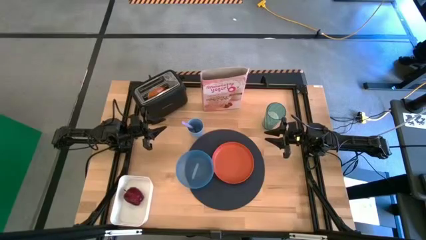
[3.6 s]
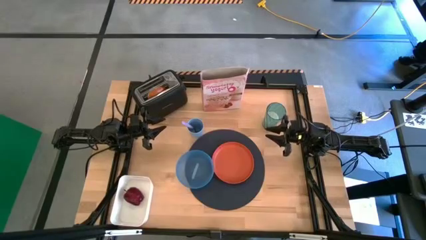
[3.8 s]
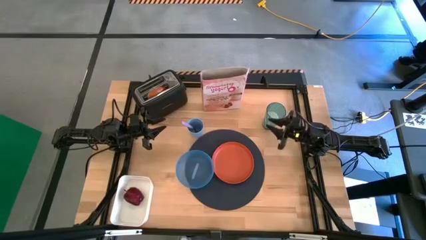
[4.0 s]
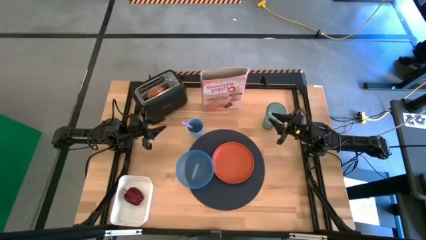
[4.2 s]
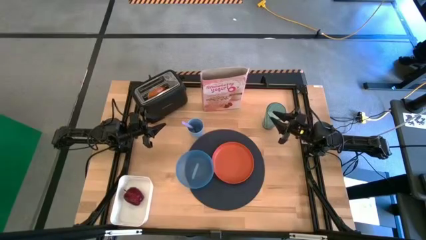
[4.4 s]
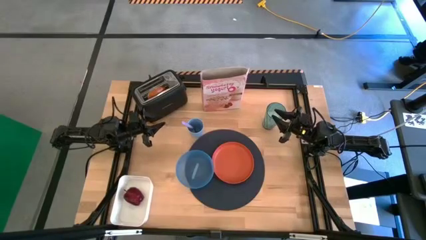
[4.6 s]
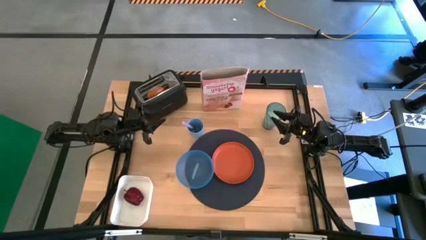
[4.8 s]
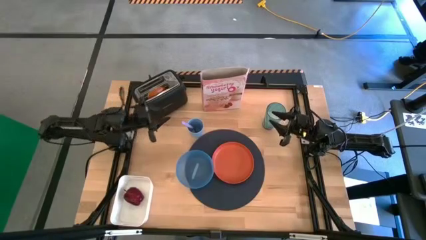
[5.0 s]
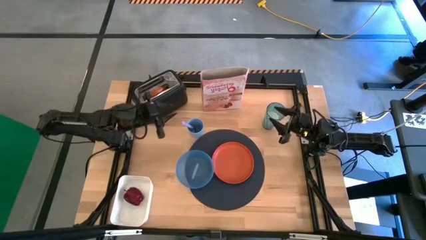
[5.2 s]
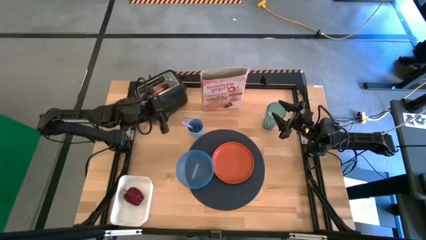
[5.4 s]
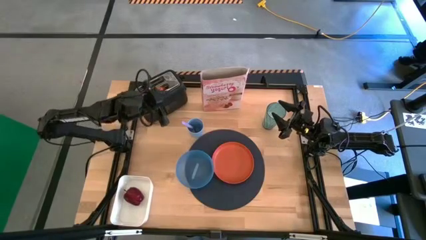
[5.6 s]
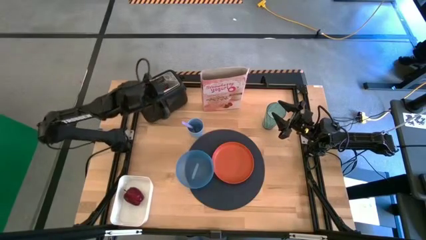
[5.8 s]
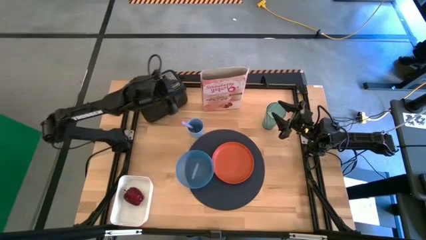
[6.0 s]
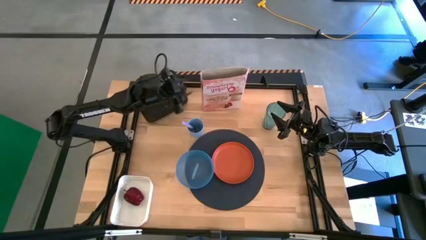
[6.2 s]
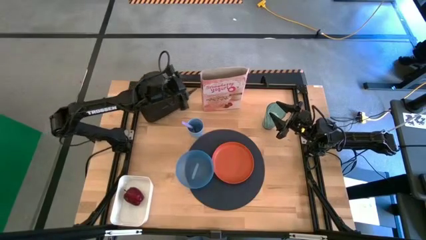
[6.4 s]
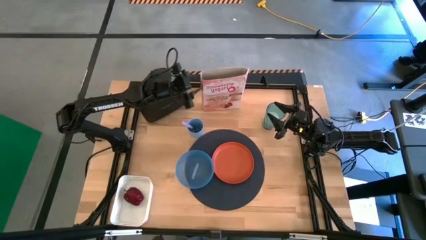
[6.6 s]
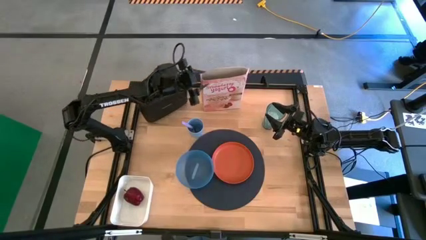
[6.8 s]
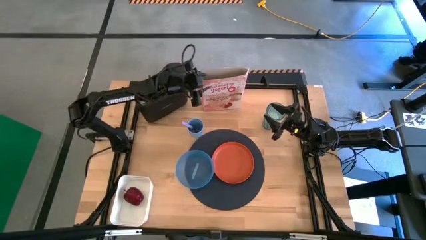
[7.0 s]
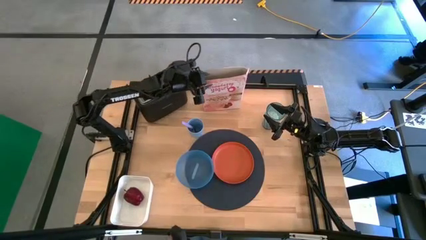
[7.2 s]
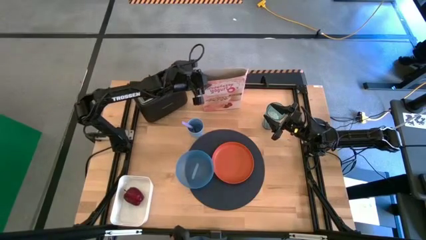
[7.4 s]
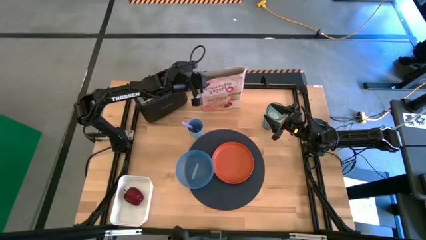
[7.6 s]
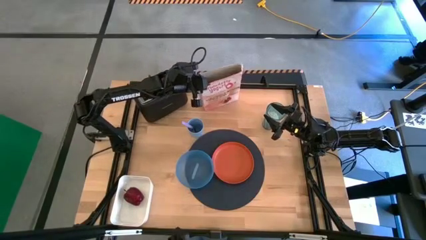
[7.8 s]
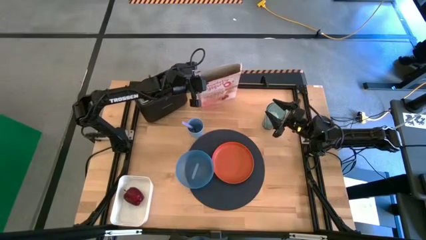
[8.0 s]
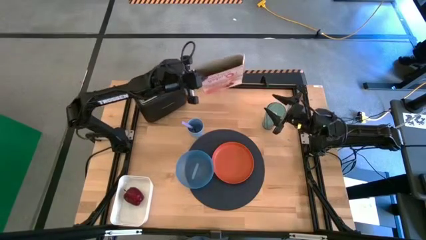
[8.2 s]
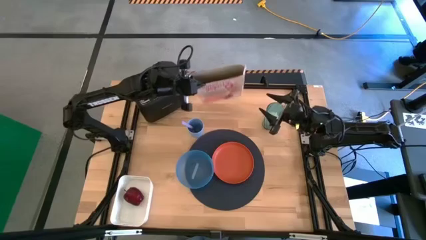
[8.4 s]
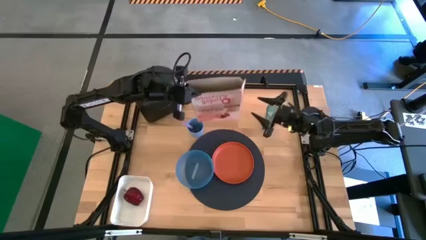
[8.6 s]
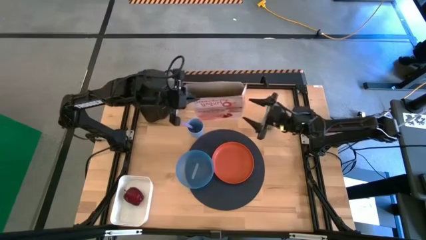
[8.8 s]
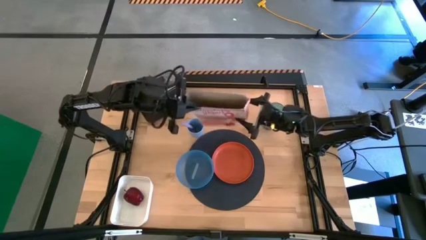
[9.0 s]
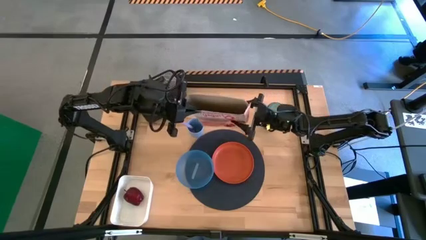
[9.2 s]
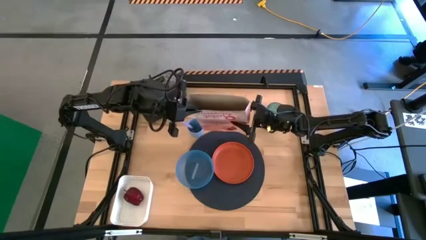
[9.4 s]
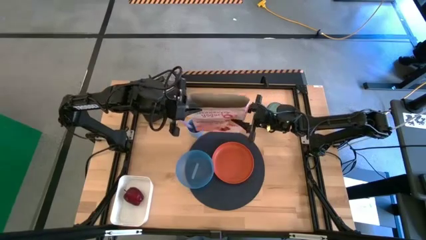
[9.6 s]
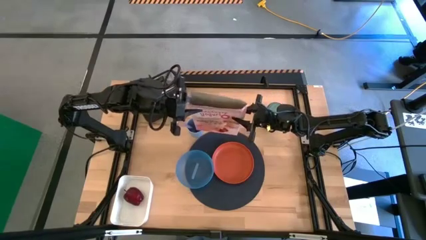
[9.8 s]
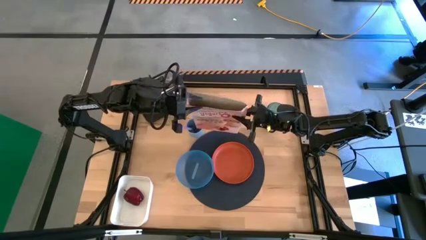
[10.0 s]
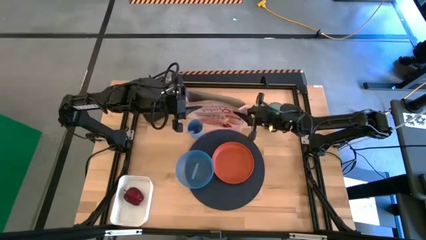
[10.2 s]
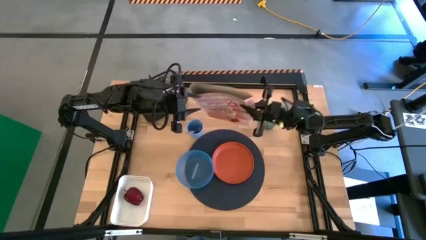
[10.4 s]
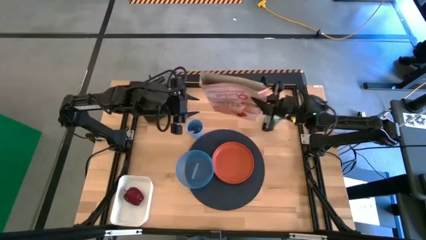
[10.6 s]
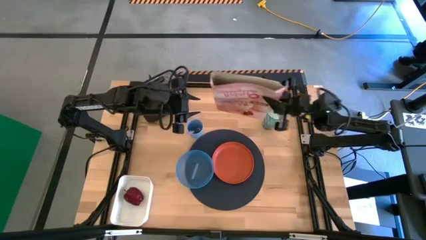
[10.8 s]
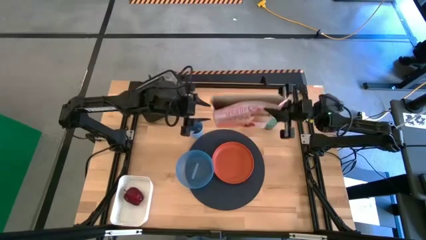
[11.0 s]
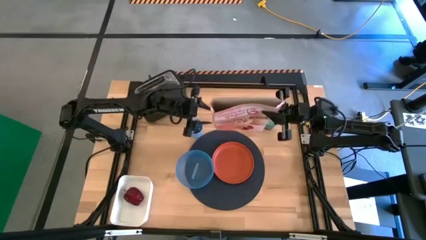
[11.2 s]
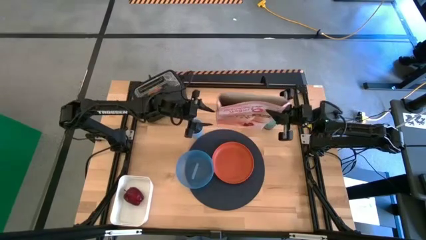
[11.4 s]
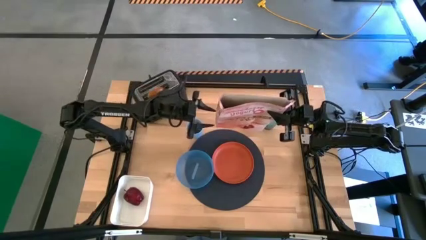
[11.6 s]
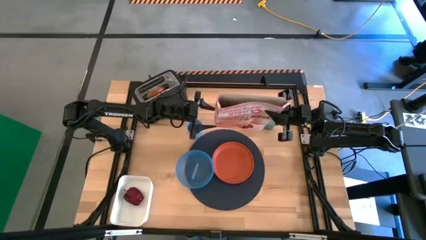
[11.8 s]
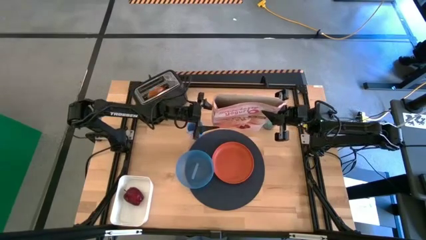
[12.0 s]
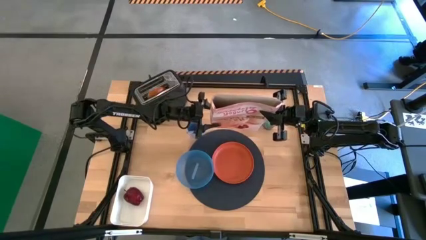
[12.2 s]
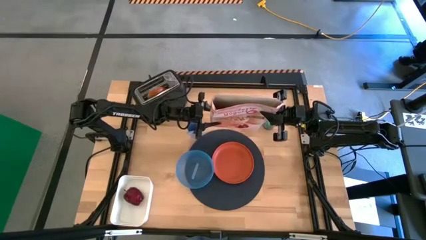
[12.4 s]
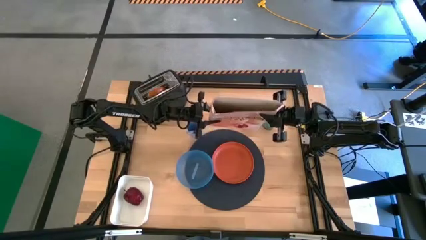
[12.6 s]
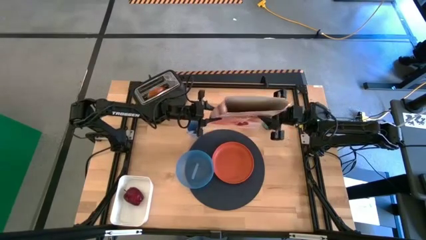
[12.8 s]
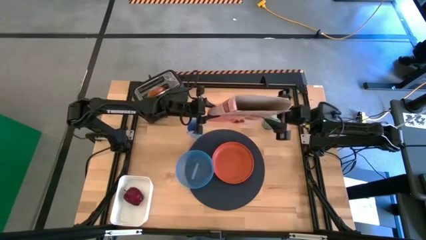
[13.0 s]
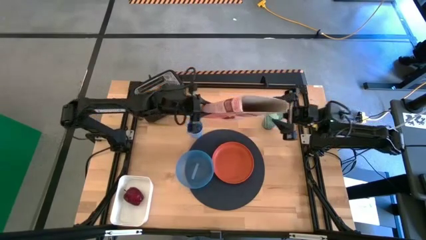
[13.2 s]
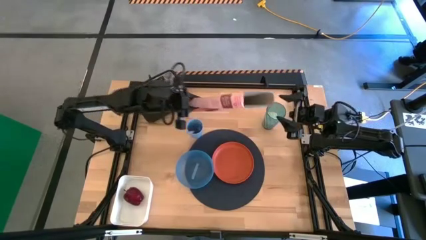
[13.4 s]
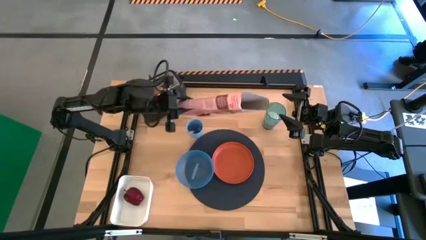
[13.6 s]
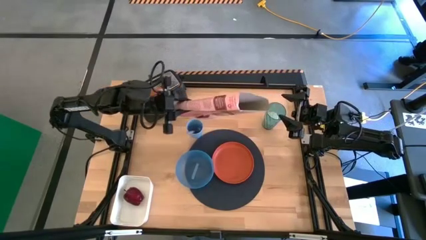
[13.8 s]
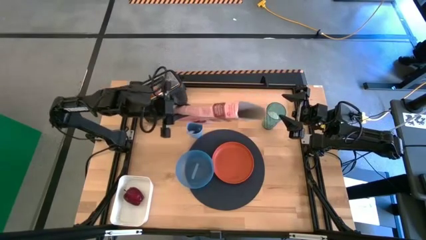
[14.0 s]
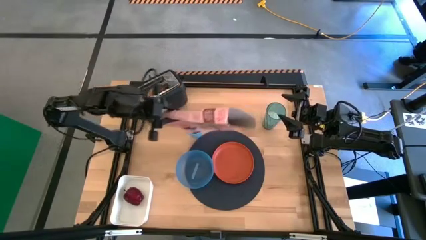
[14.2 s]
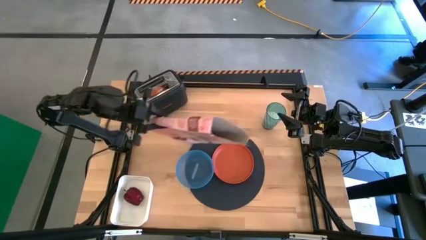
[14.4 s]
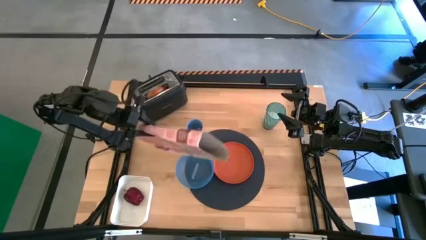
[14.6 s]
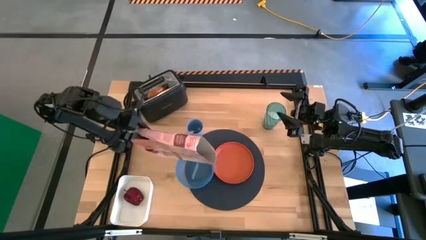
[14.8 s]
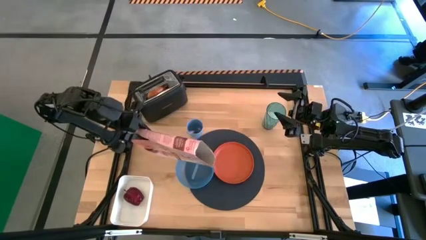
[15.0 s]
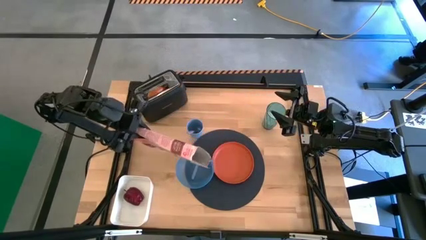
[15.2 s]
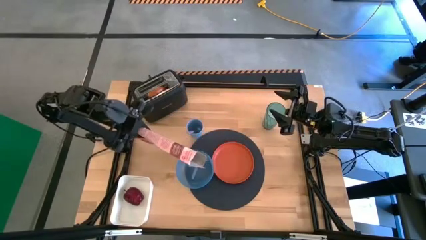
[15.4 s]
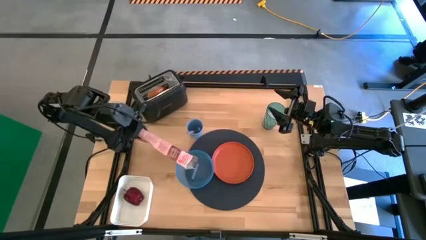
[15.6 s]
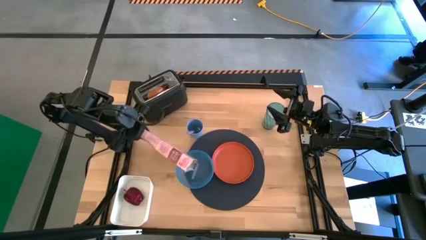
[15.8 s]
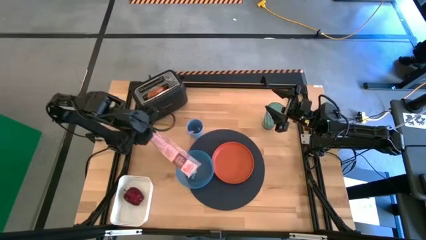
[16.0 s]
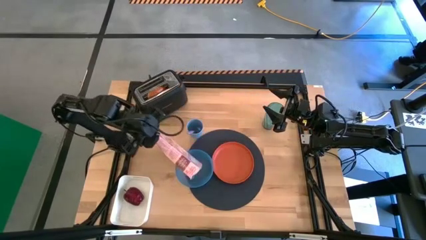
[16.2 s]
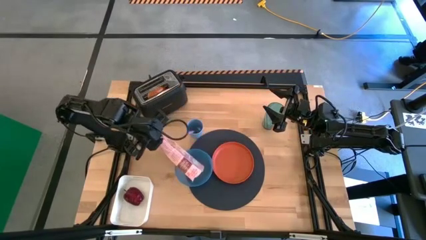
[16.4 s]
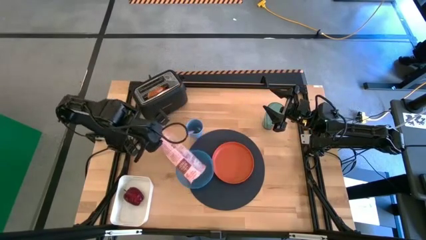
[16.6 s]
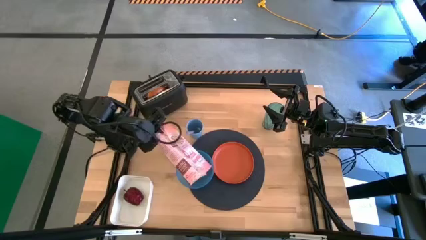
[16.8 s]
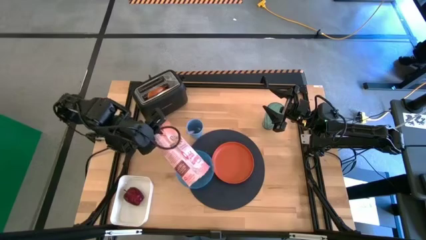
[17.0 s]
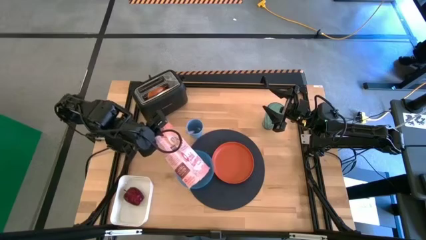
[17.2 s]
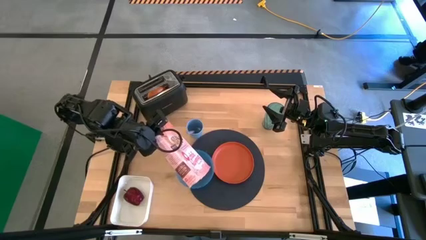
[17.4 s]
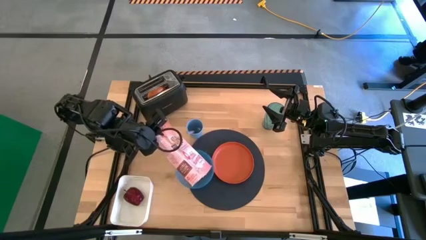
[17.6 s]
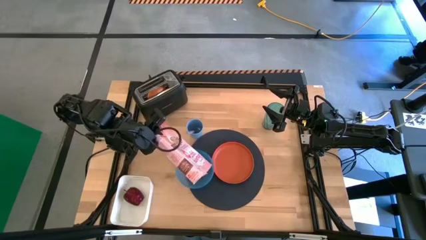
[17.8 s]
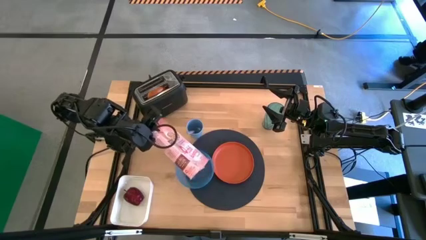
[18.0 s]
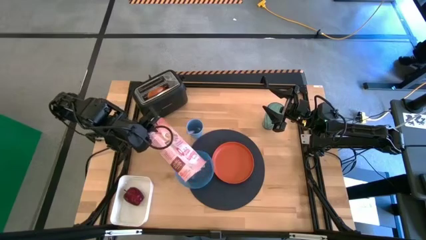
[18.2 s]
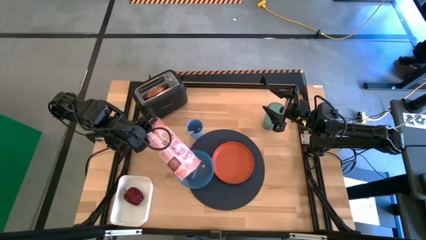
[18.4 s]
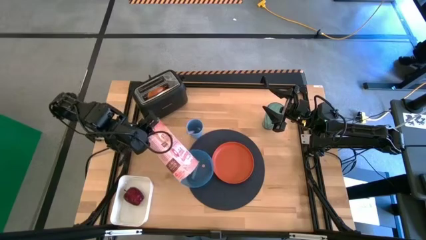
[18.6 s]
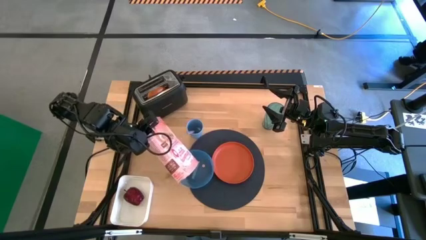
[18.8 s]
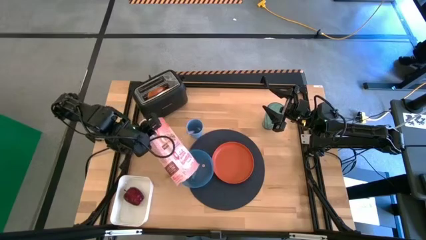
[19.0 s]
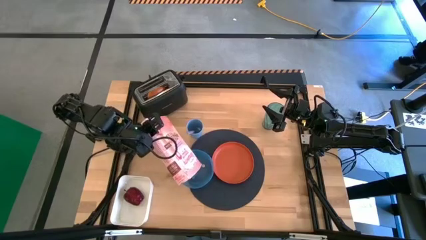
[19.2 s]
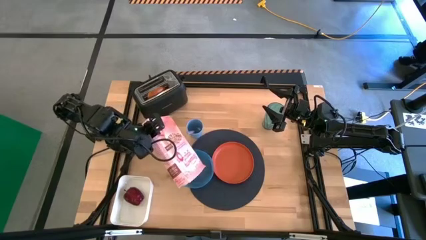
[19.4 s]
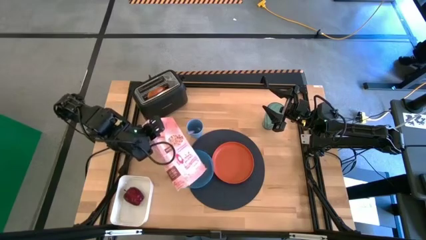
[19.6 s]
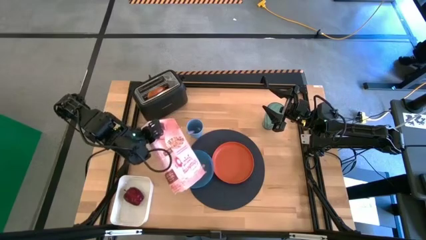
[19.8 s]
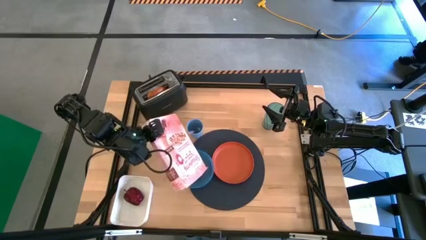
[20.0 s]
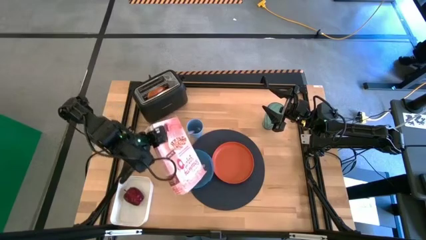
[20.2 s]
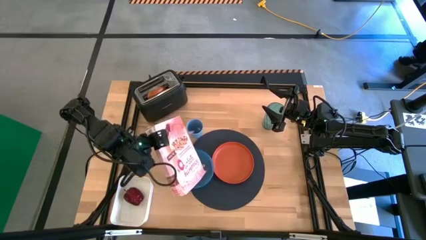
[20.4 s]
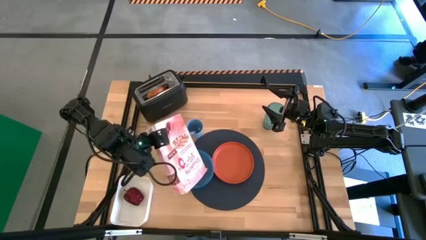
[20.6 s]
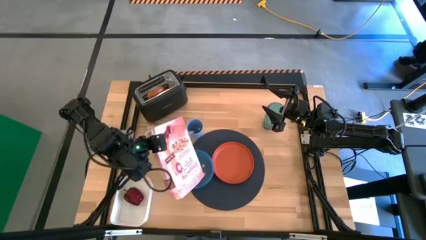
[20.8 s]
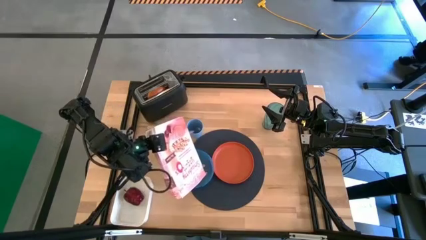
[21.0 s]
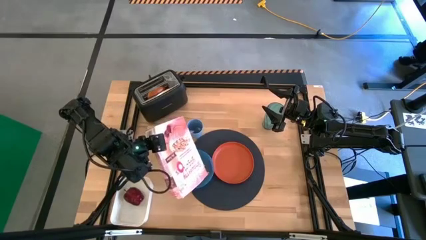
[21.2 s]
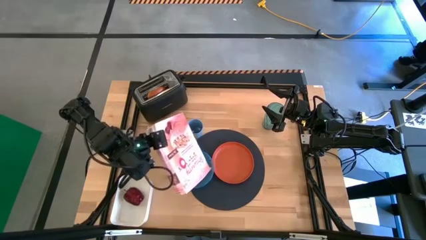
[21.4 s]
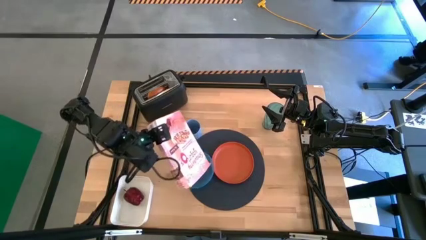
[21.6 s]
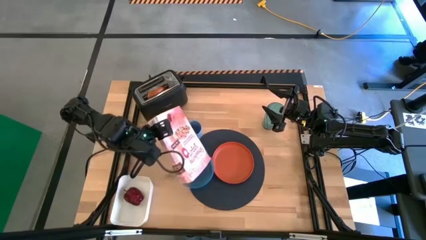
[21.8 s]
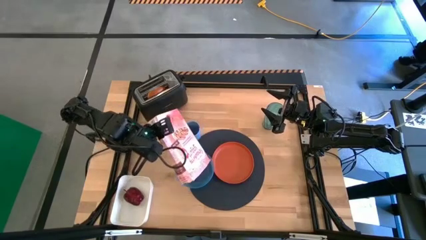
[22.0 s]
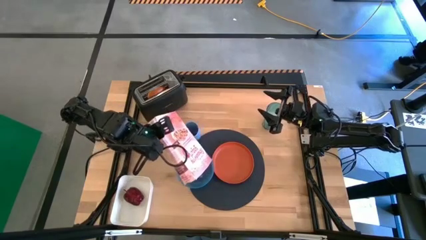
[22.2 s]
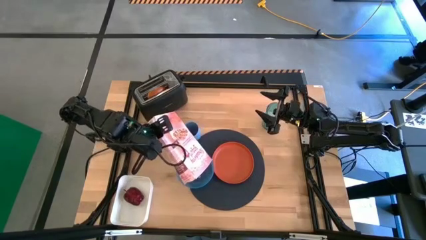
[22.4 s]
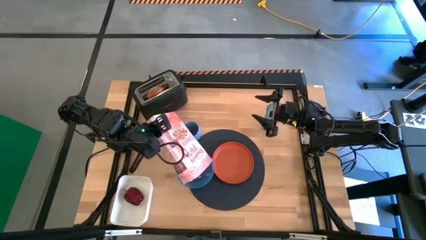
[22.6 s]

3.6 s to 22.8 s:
Task: Arrange a breakfast setting
Pour the cereal from the cereal box into a blue bowl
